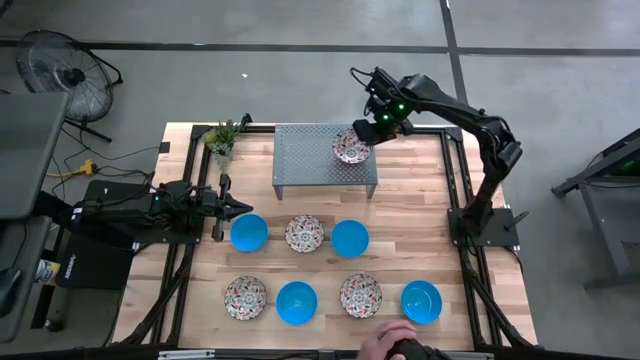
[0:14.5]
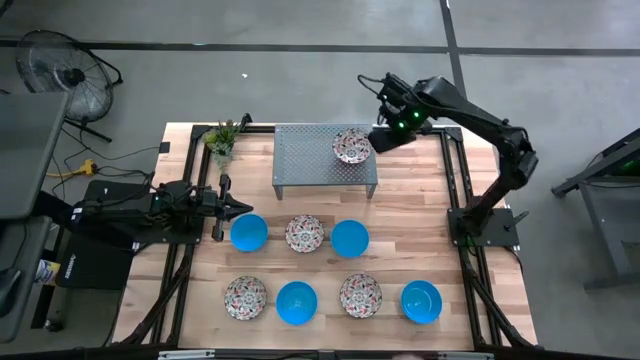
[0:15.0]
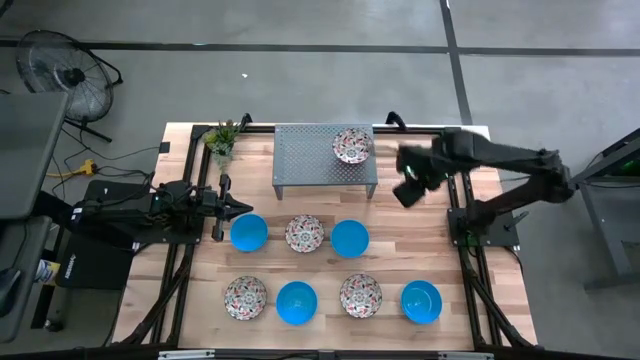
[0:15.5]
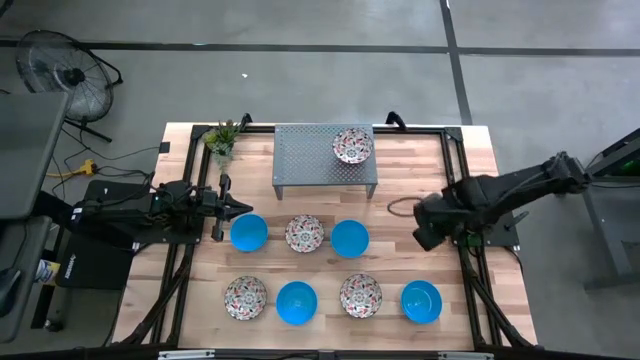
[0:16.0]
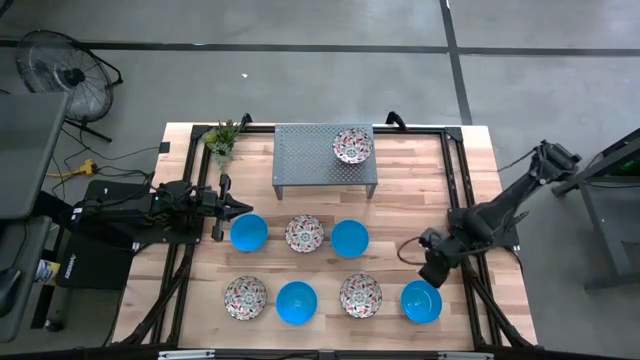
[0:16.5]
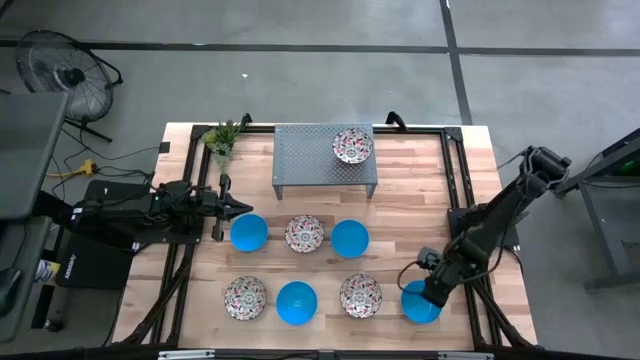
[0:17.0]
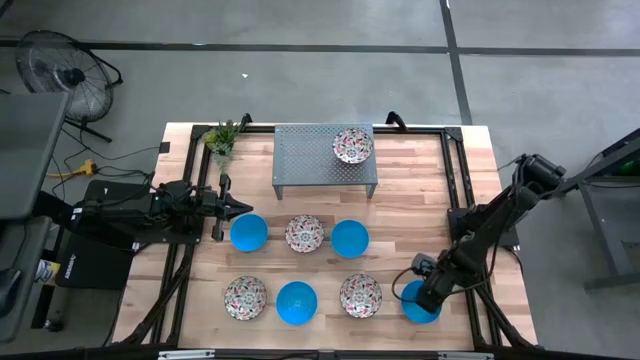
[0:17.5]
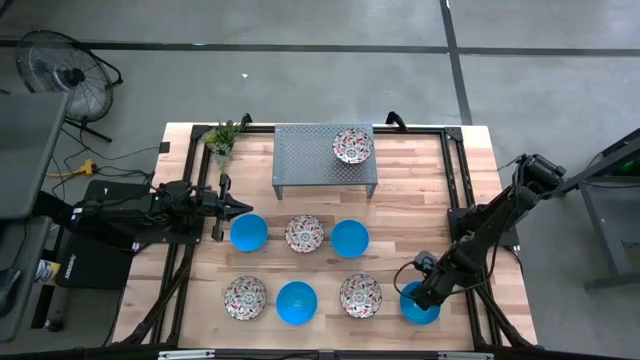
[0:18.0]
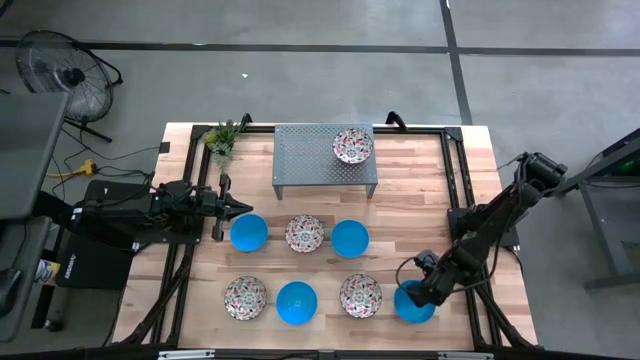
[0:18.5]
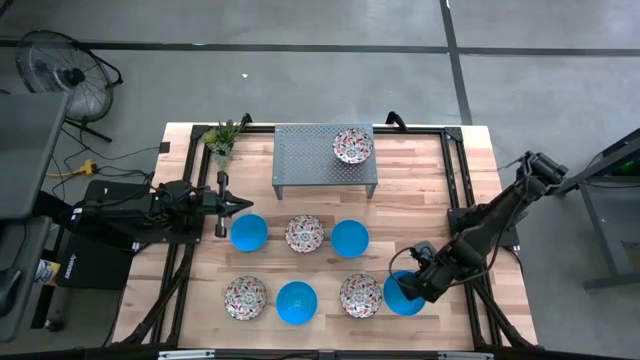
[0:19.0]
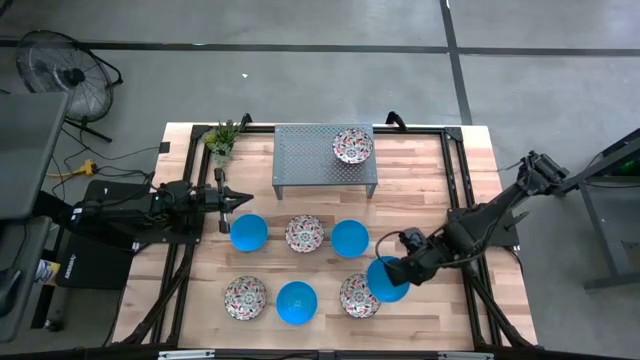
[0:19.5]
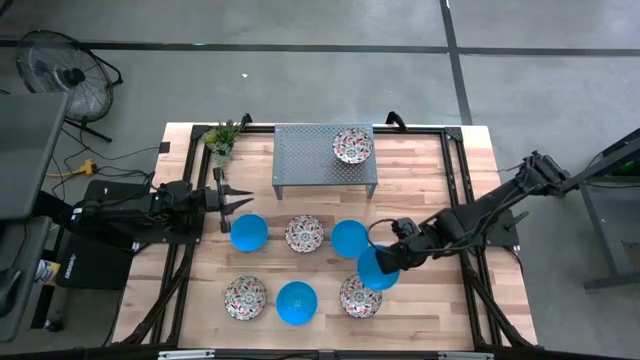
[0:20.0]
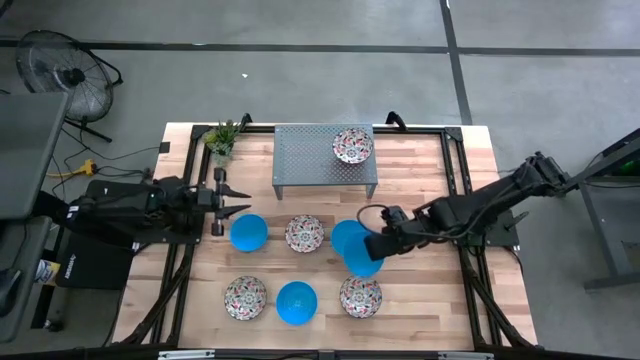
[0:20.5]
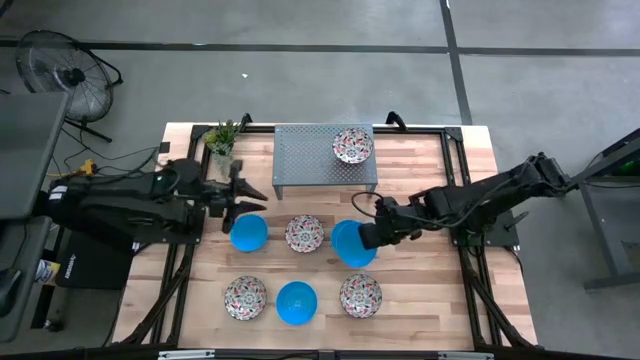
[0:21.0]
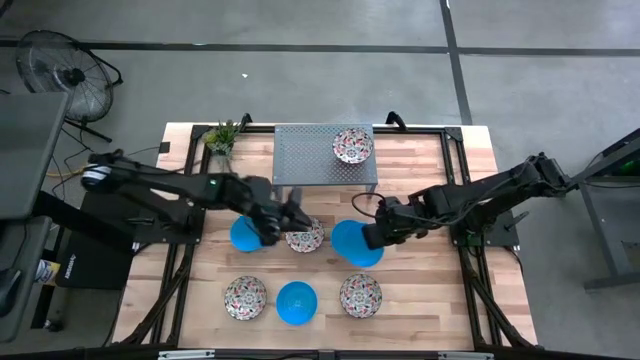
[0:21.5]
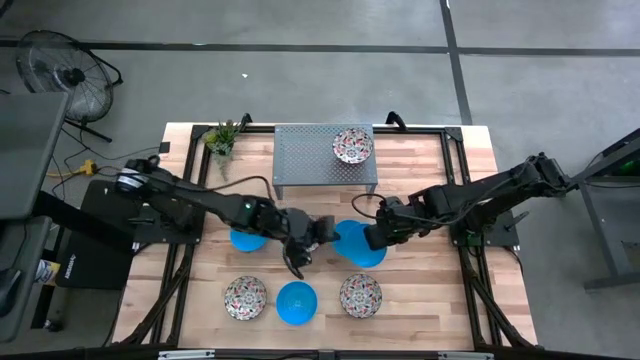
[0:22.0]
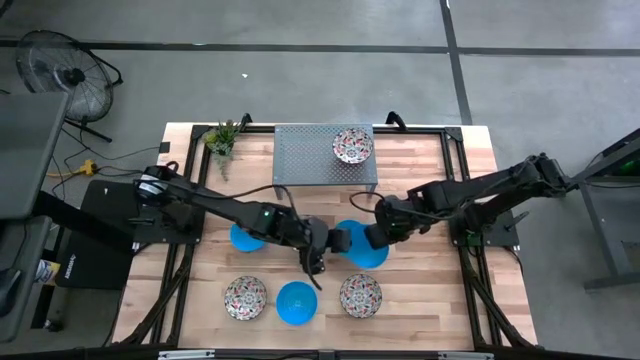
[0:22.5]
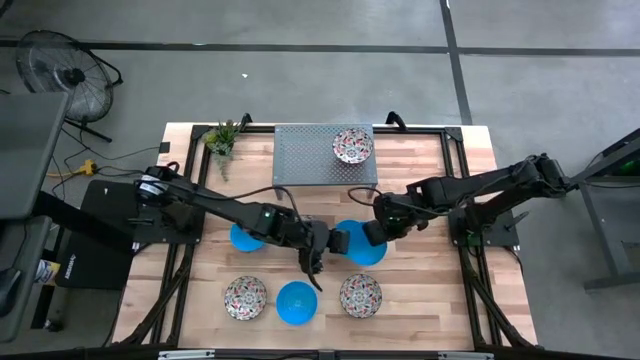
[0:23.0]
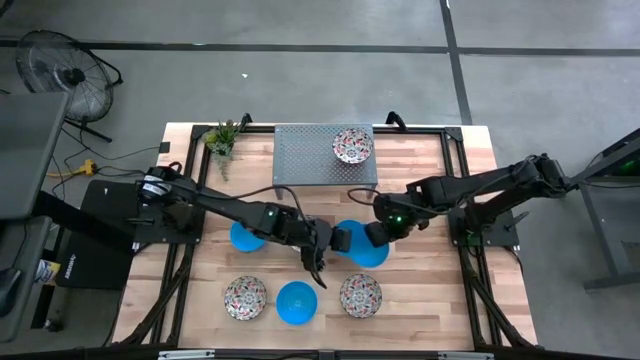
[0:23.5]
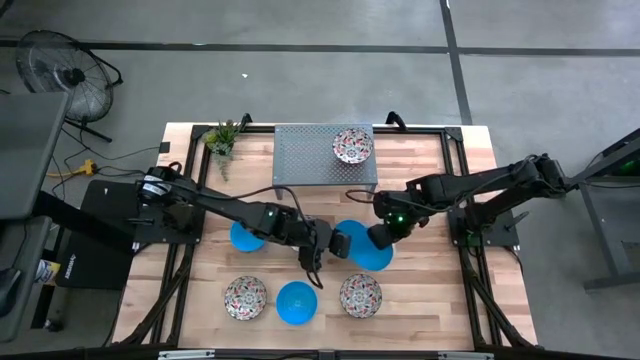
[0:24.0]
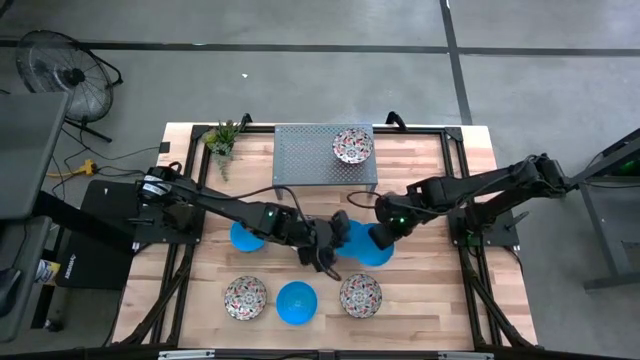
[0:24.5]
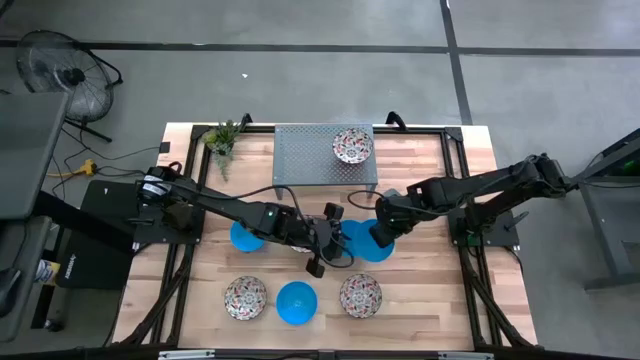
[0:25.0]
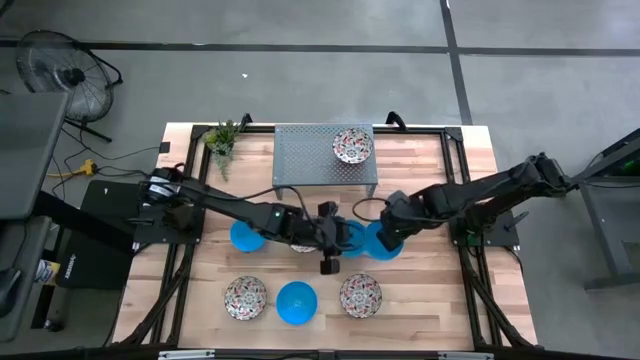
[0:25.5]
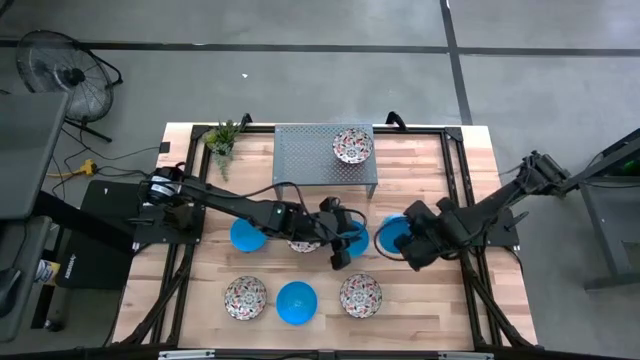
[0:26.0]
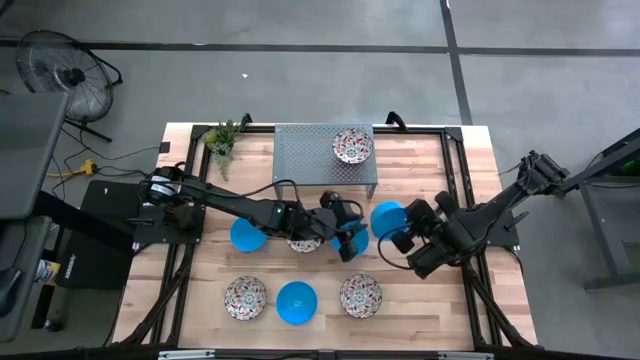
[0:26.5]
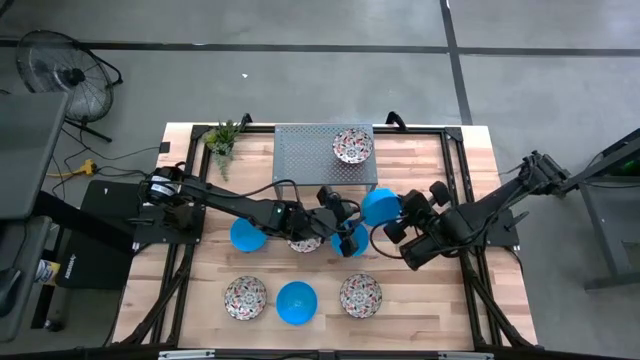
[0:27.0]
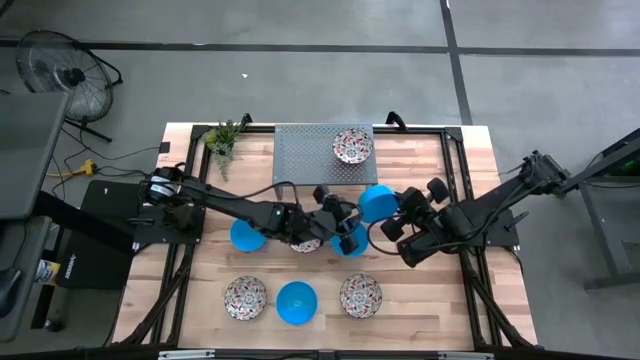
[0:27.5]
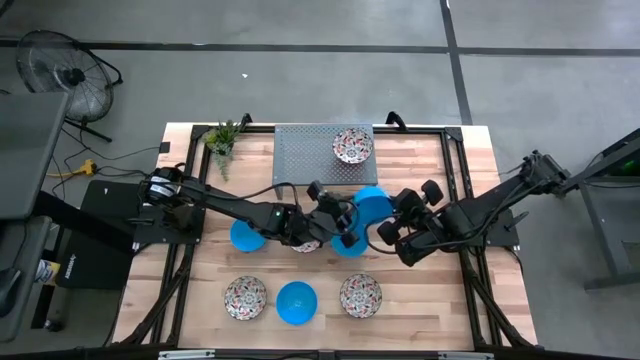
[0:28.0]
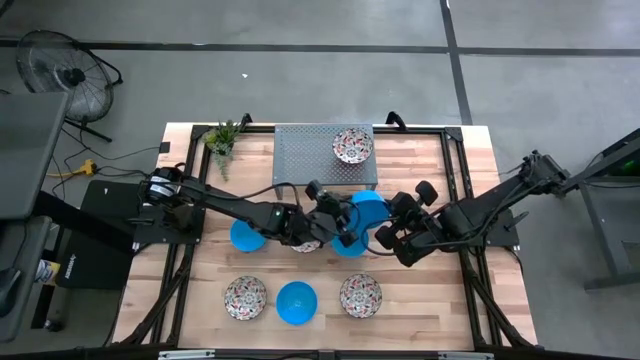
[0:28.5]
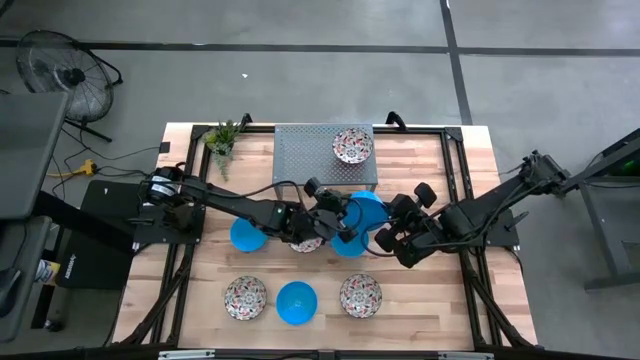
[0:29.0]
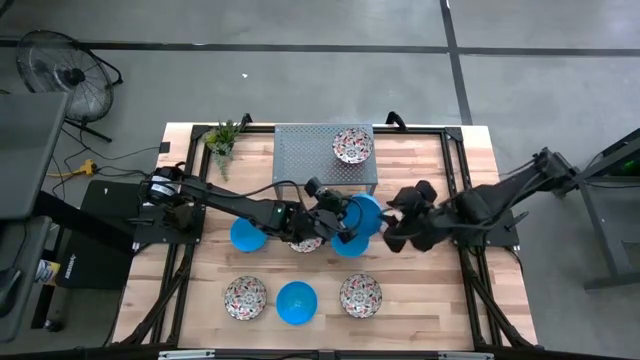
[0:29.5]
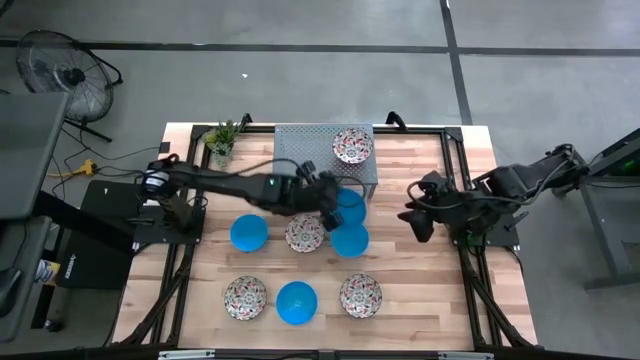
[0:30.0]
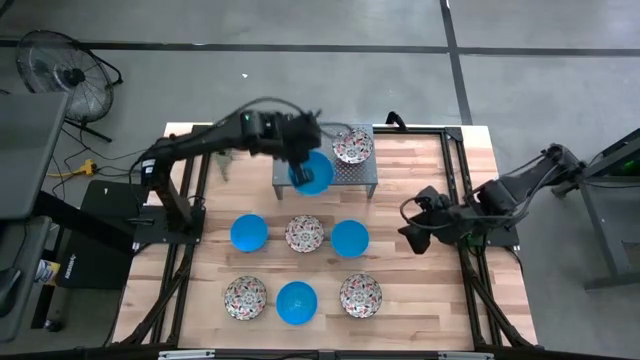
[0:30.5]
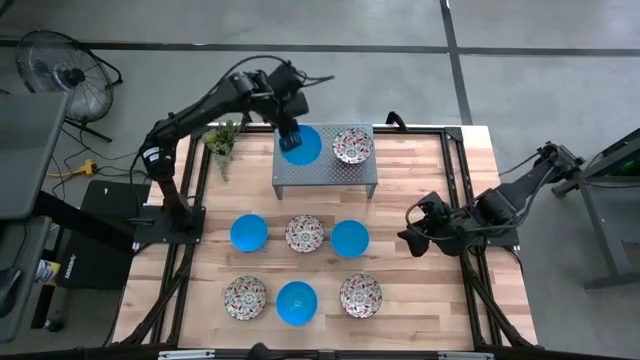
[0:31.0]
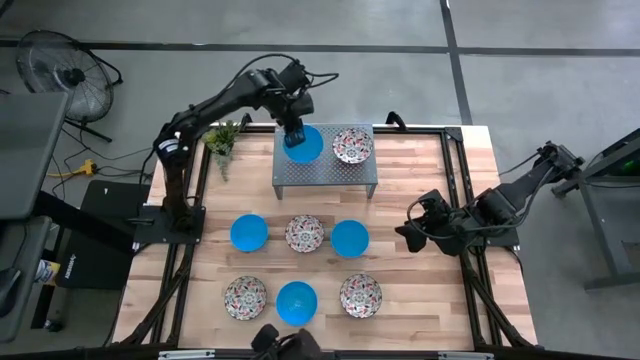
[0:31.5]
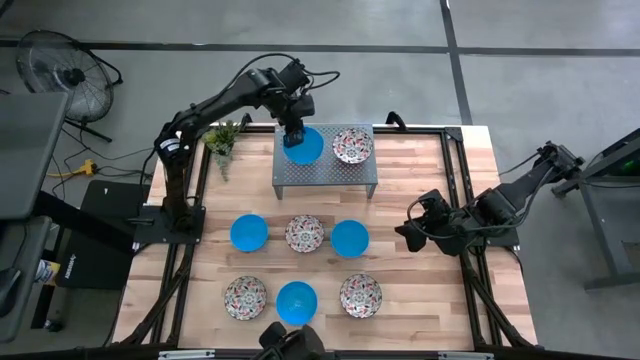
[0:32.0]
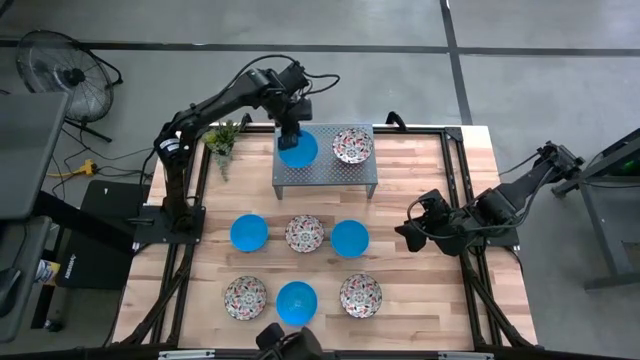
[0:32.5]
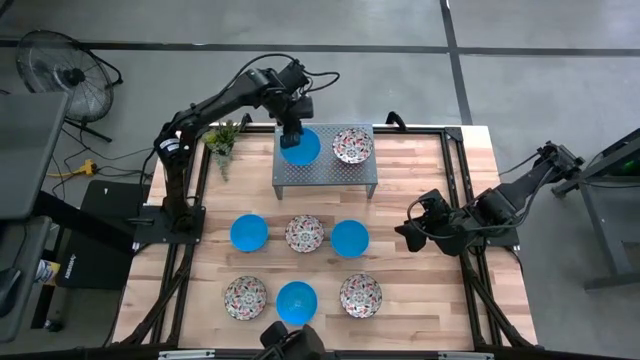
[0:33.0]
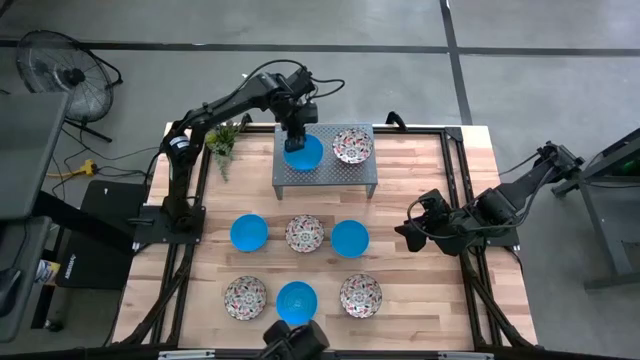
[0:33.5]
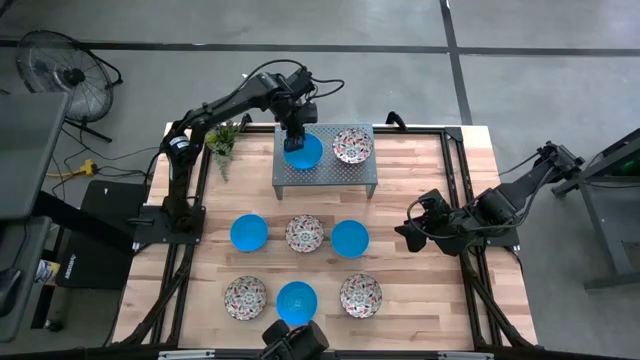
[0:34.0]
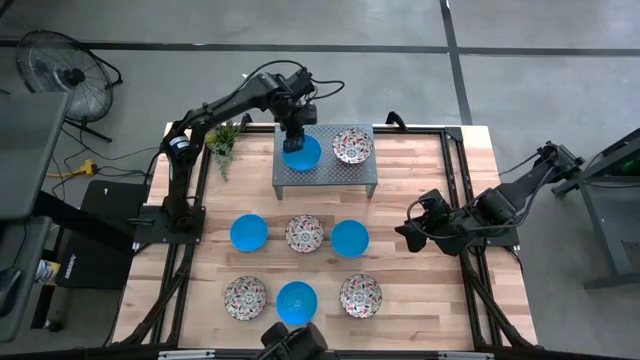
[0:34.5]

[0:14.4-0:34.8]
Task: Pick & Place Mini bowls
Put the blue bowl on the shelf
